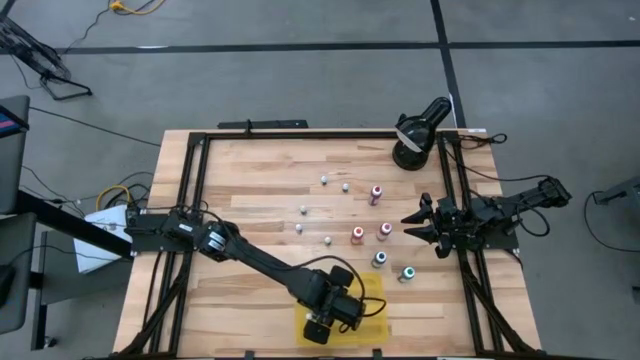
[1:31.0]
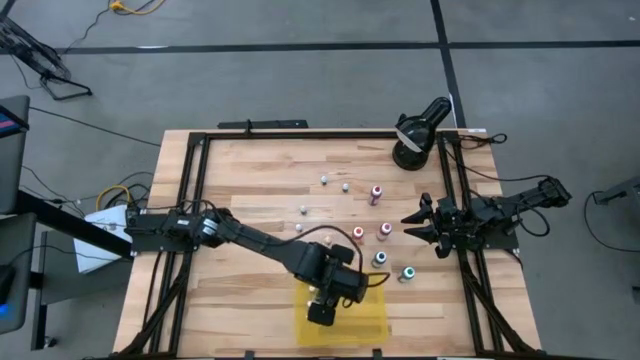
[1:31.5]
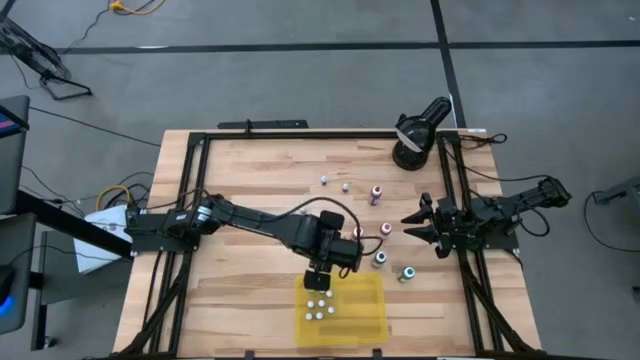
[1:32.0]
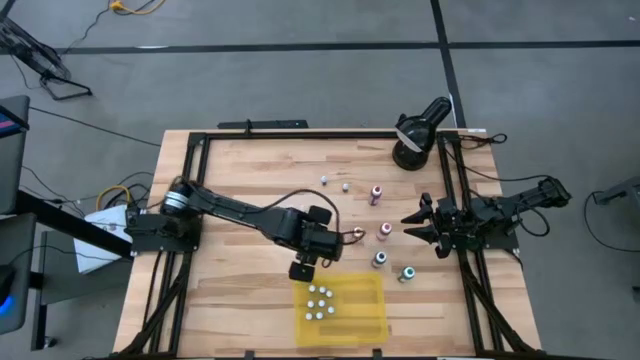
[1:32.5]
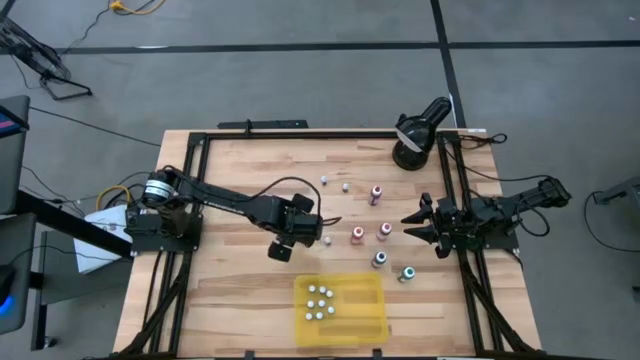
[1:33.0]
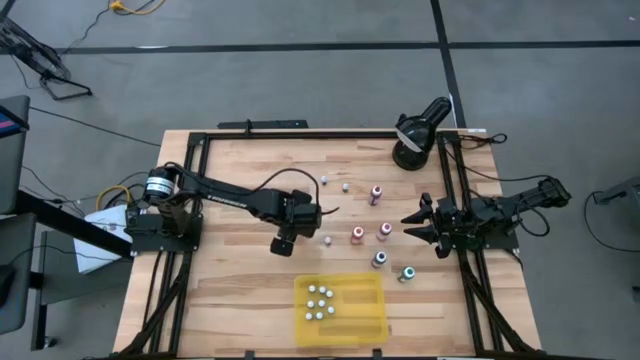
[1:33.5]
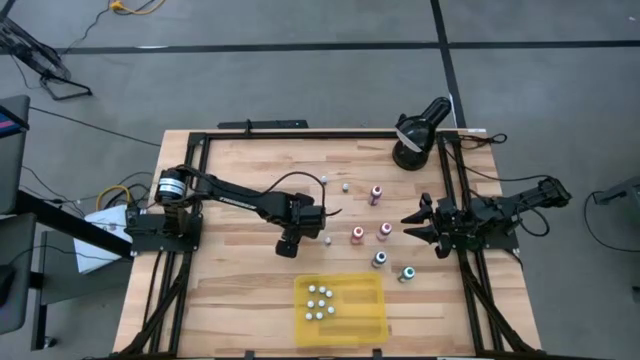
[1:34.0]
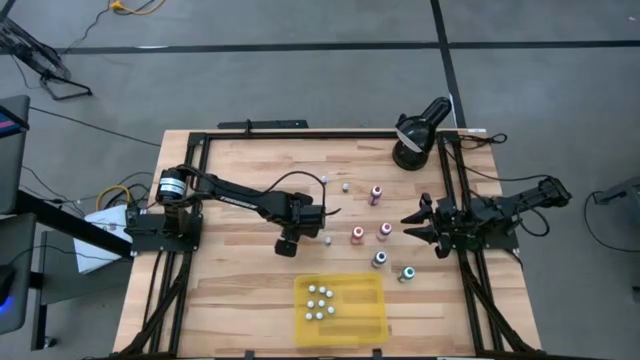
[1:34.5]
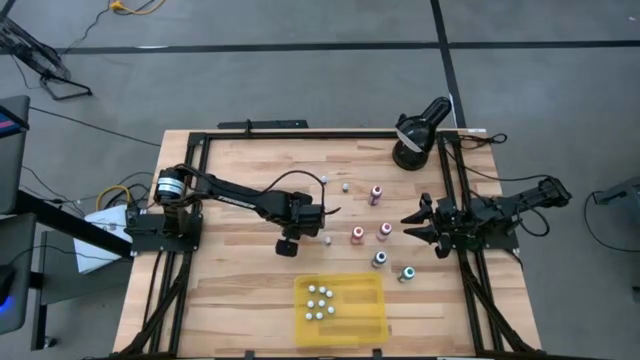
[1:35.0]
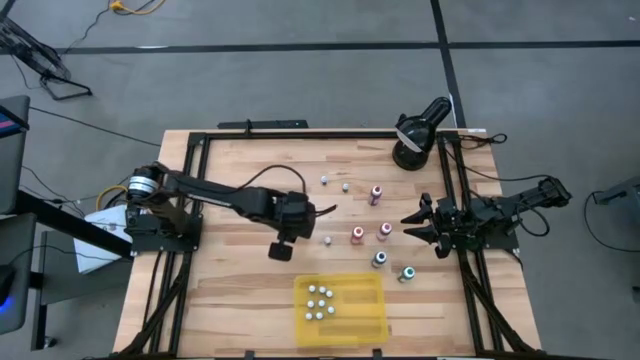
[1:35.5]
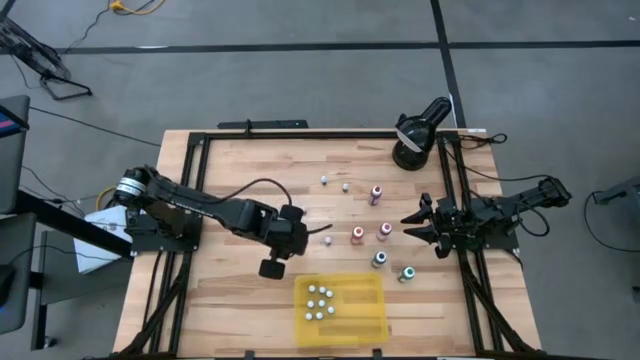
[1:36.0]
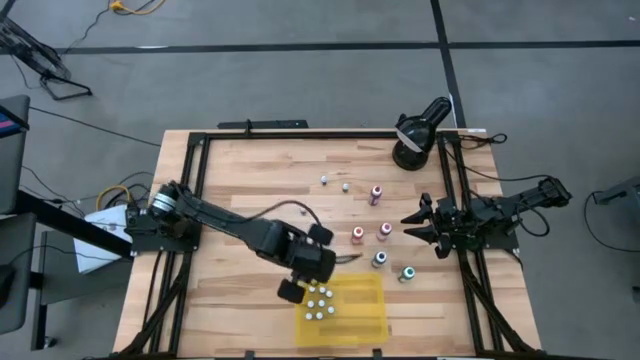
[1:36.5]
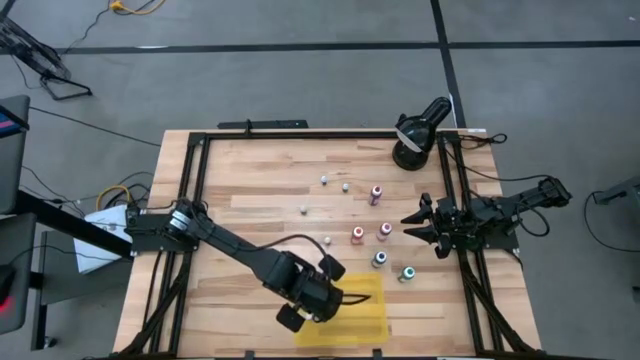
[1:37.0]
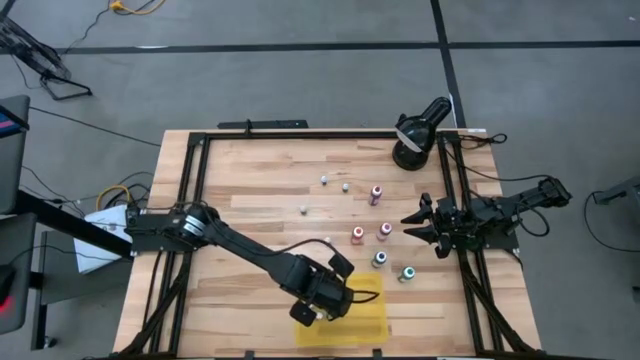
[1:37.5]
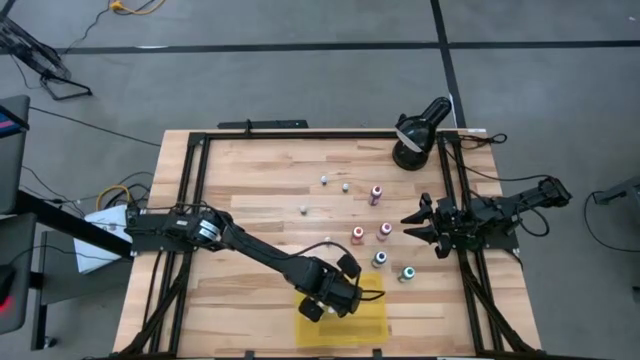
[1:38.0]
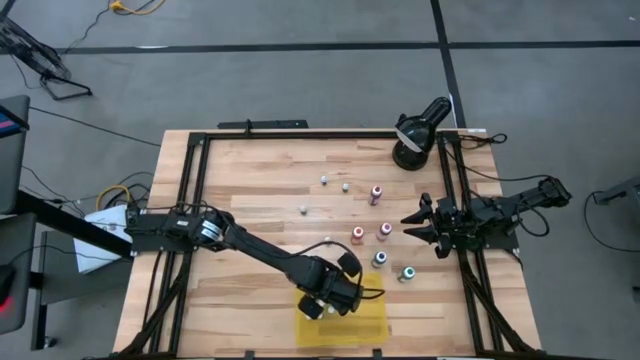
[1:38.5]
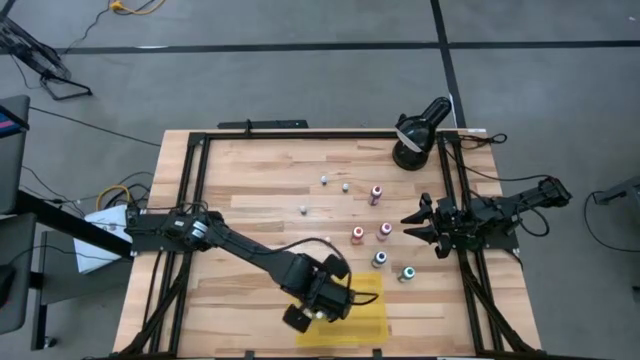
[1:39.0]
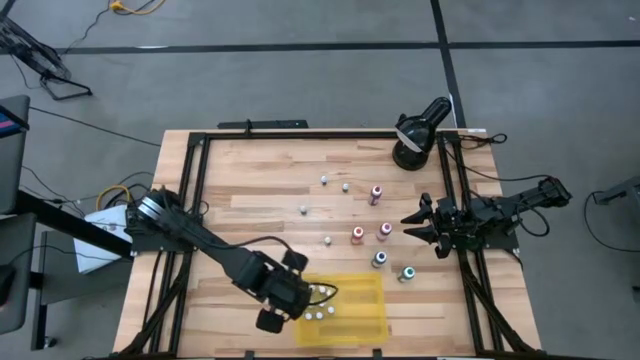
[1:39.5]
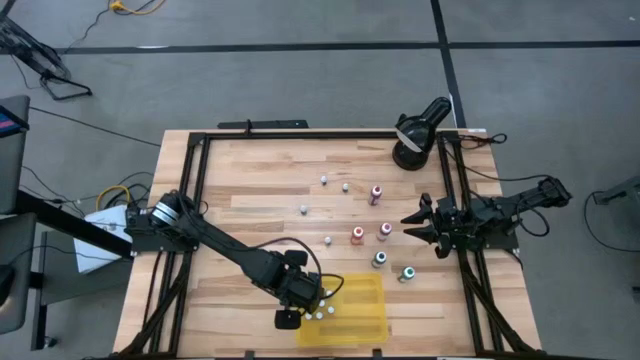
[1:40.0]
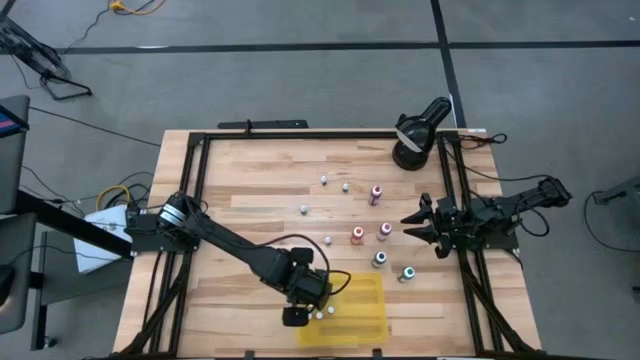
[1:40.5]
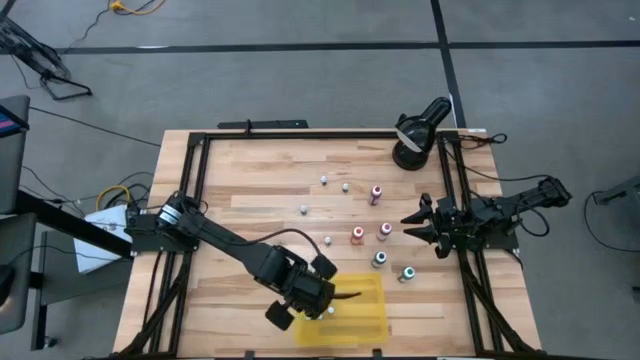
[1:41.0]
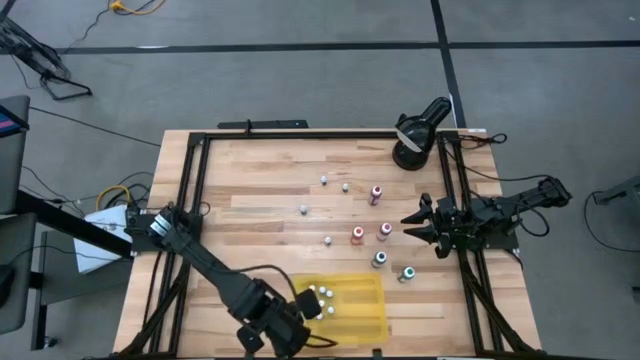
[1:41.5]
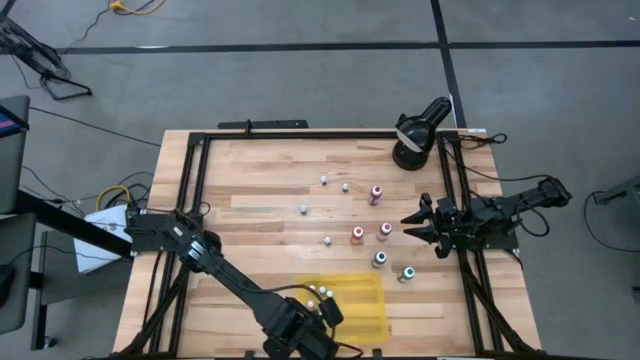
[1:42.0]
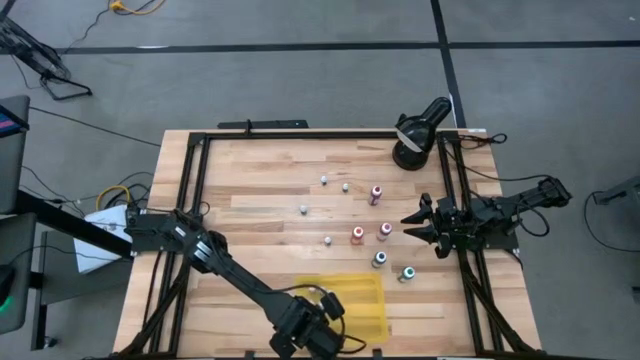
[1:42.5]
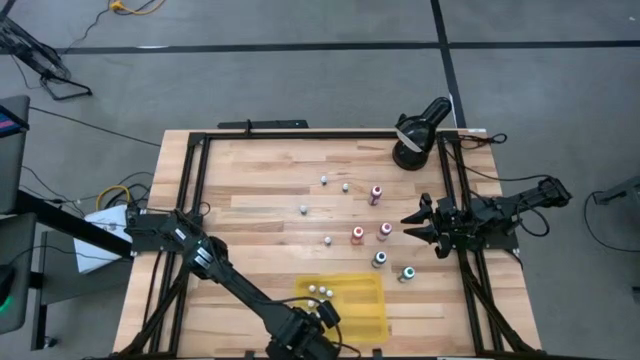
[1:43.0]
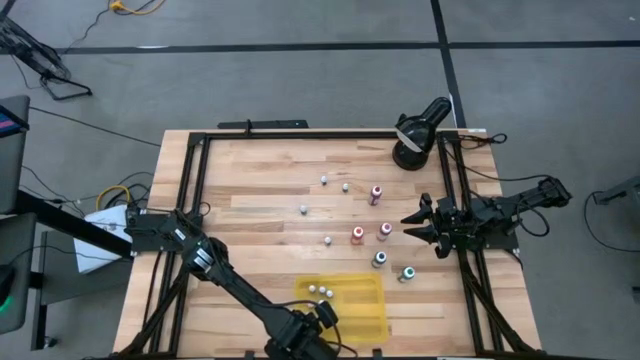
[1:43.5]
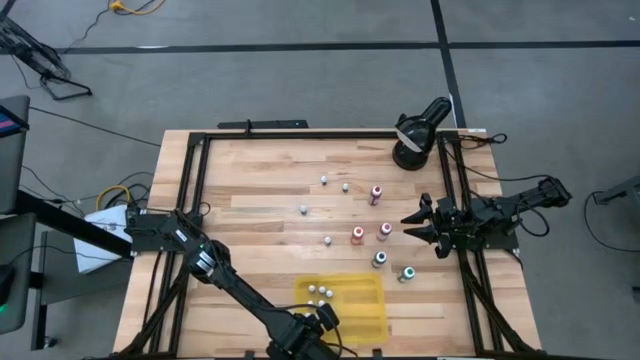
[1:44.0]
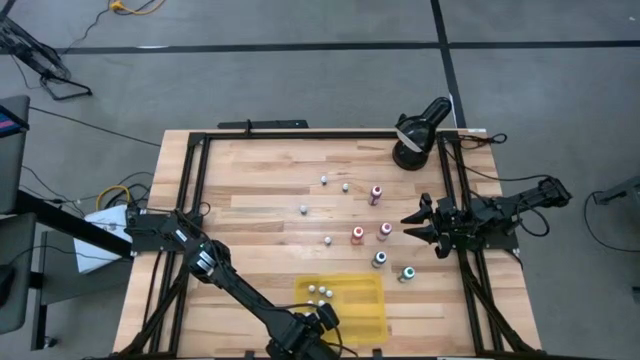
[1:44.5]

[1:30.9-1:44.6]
Task: Pick & Place food coloring
Put the small red food coloring bottle in the yellow bin

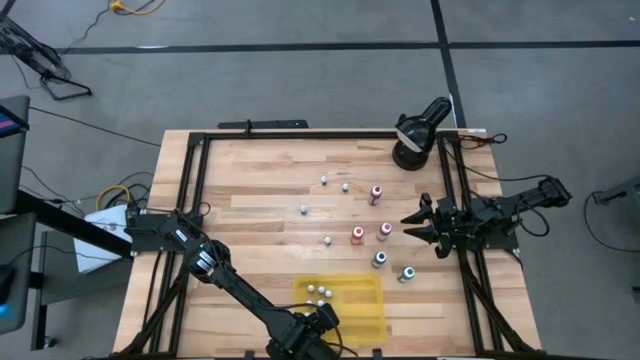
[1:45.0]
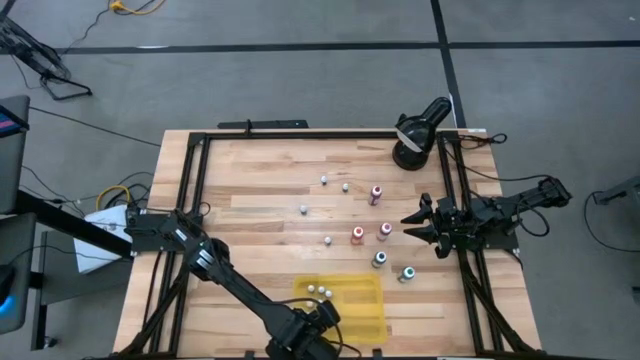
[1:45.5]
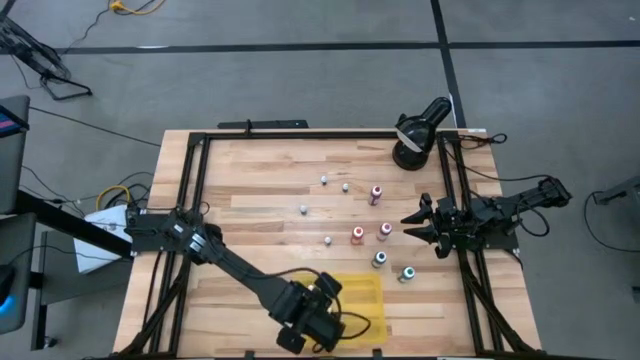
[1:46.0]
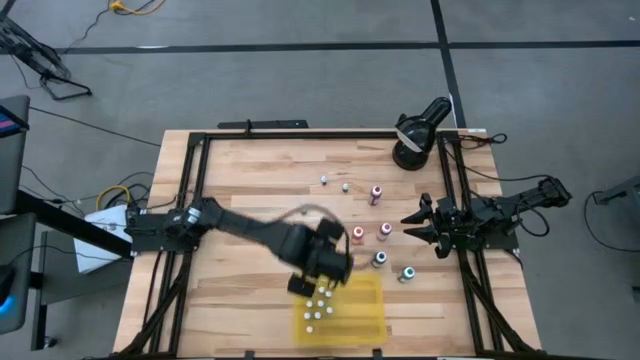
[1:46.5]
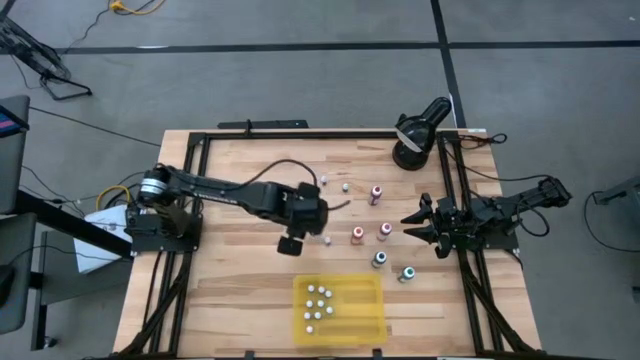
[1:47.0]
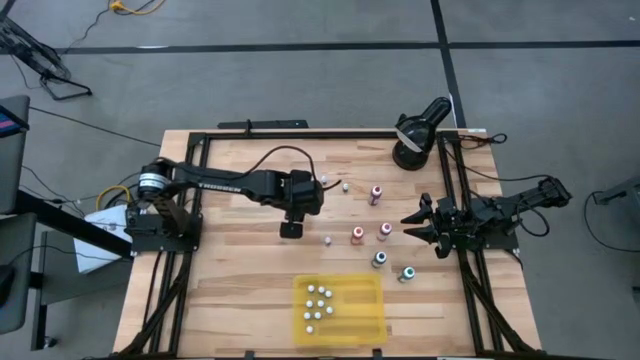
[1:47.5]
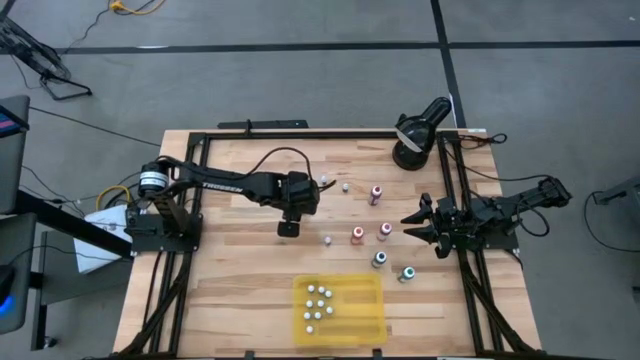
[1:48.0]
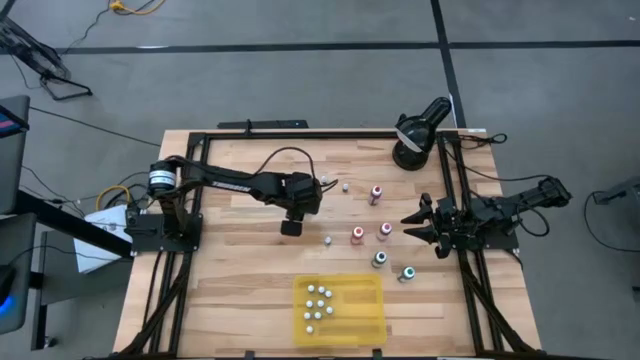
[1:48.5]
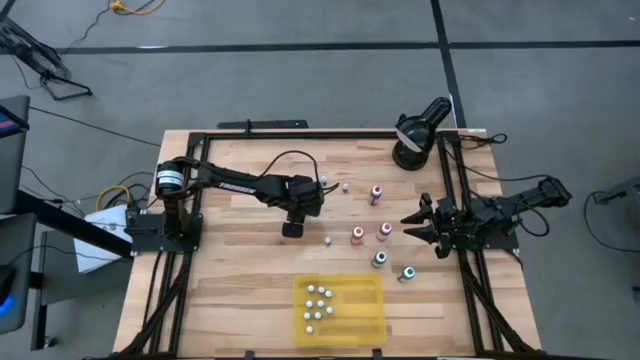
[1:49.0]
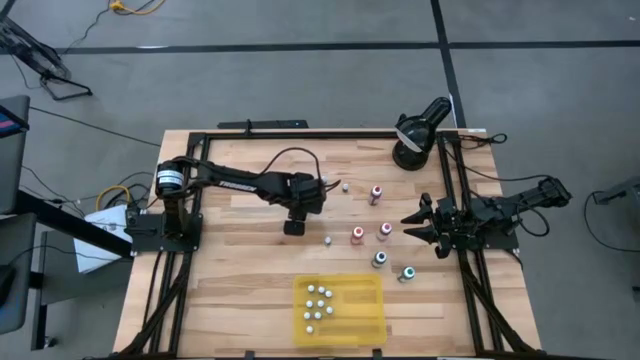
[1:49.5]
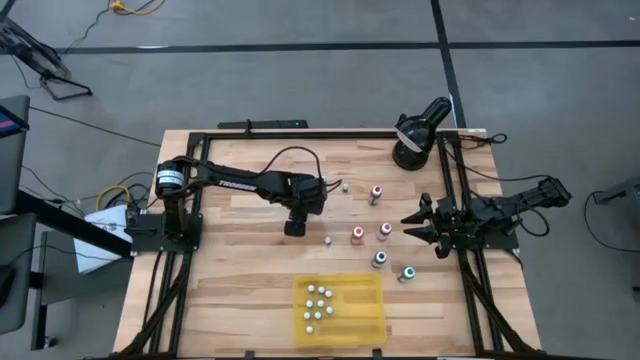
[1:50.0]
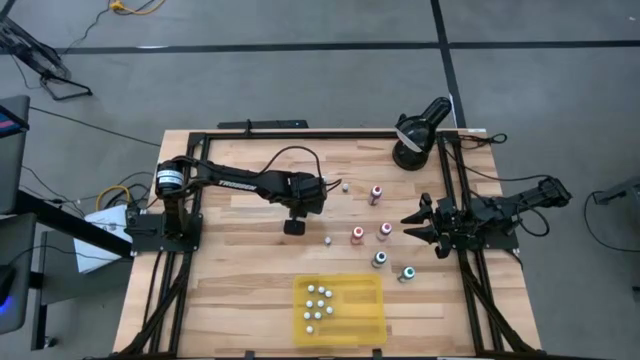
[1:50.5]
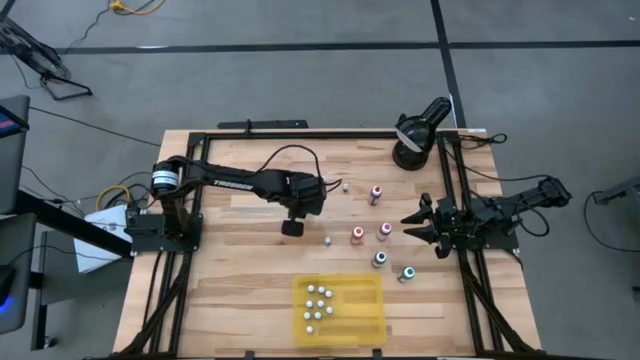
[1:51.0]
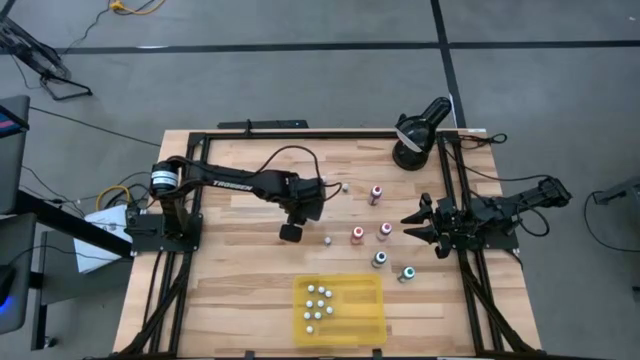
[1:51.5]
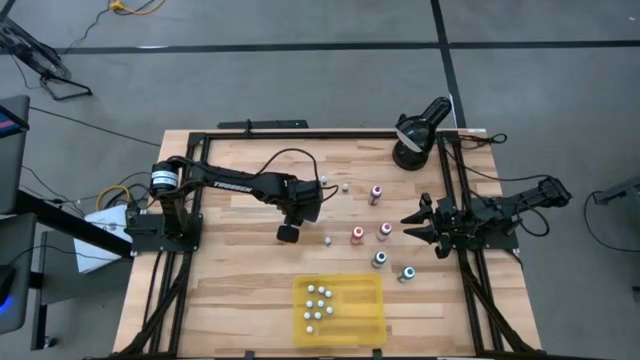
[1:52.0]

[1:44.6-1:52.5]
Put the small blue food coloring bottle in the yellow bin
